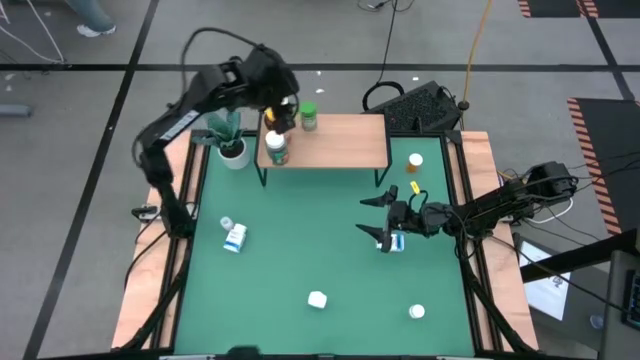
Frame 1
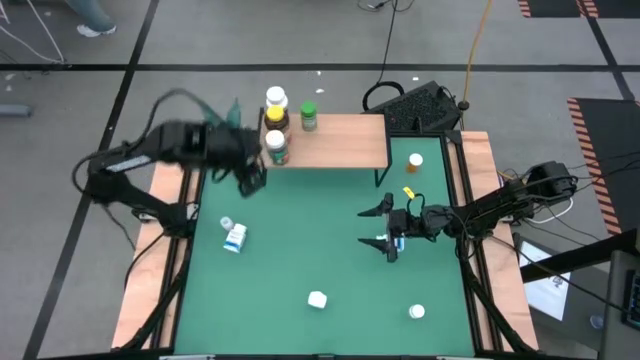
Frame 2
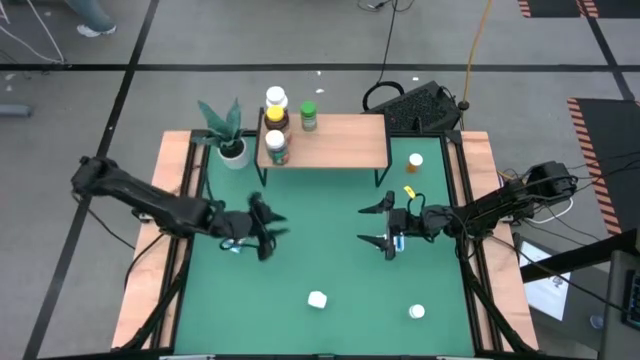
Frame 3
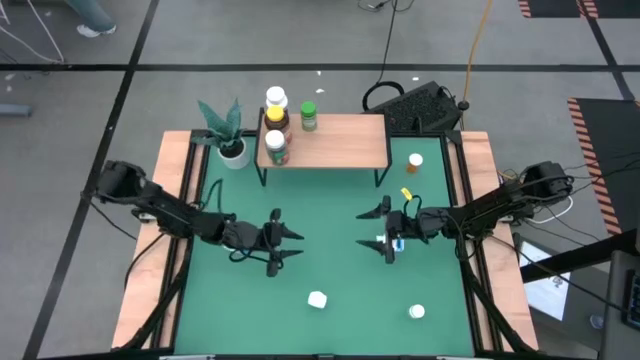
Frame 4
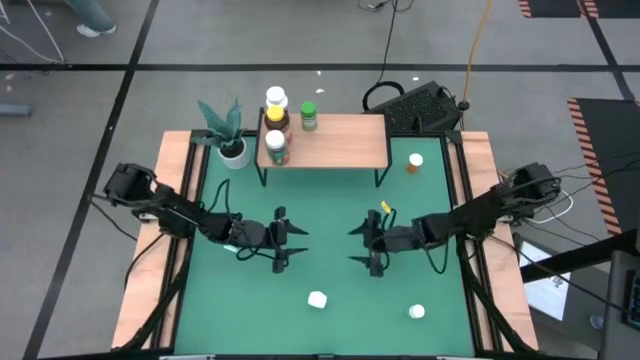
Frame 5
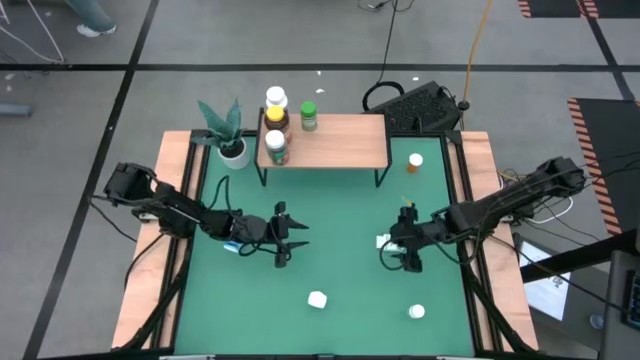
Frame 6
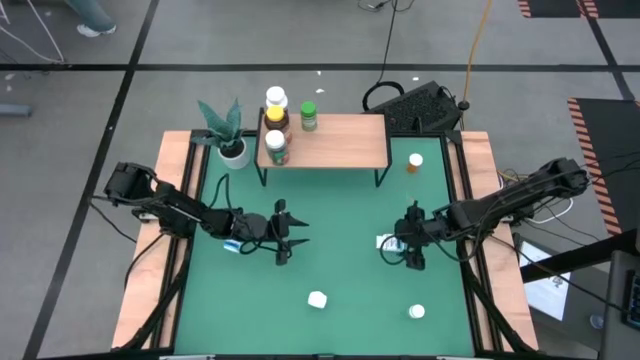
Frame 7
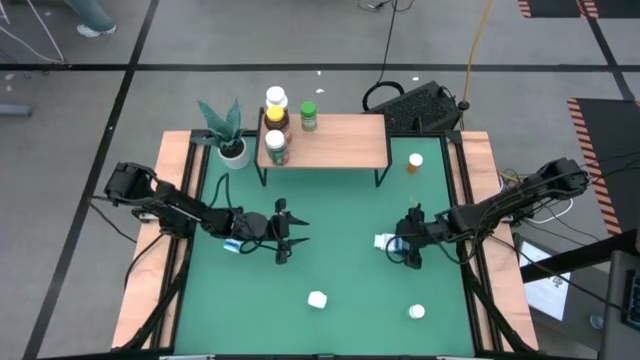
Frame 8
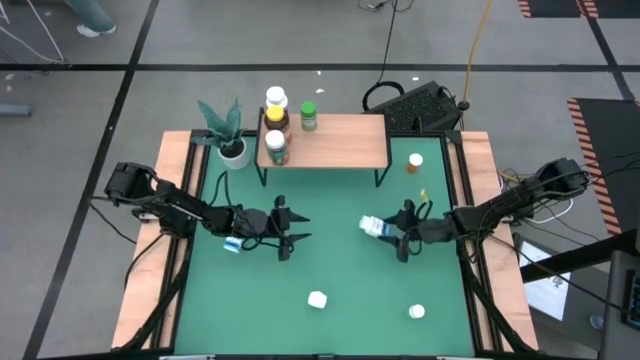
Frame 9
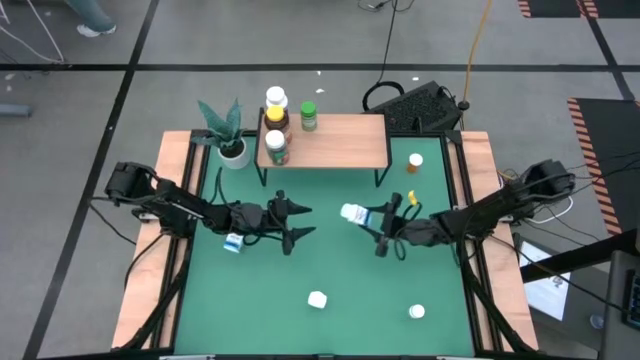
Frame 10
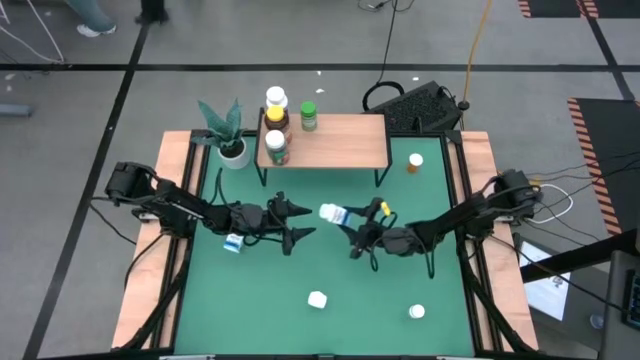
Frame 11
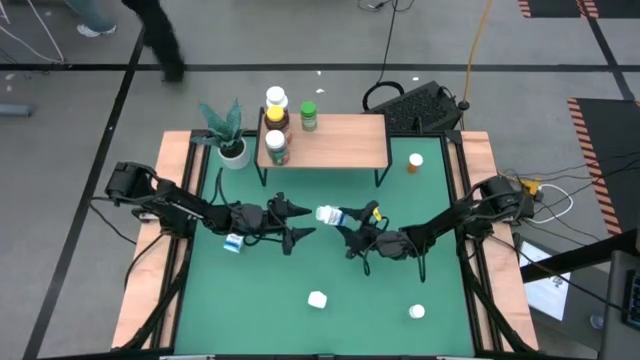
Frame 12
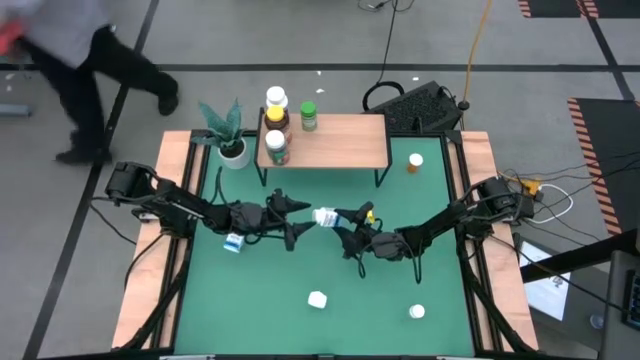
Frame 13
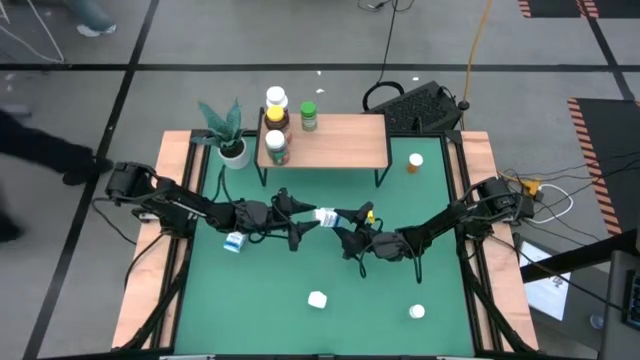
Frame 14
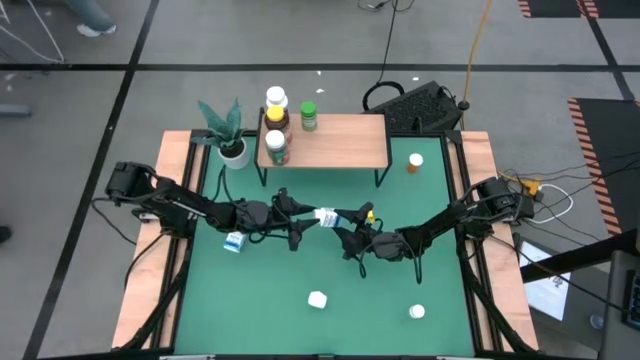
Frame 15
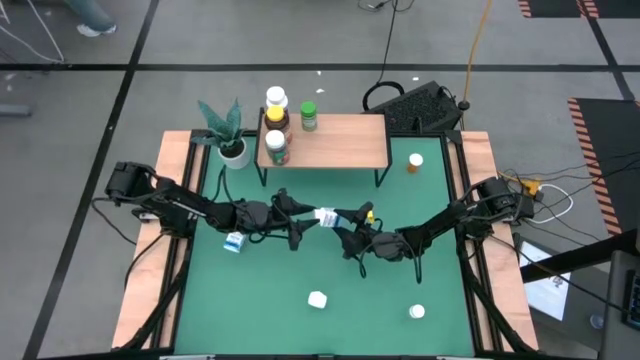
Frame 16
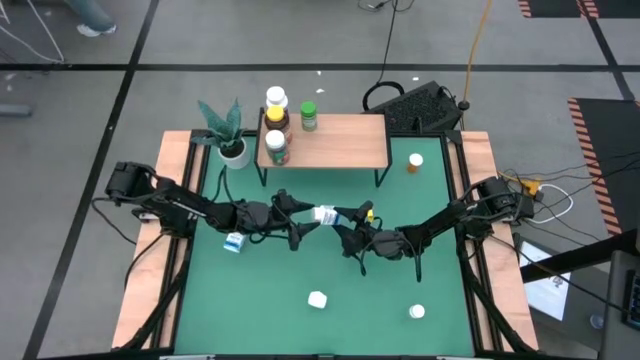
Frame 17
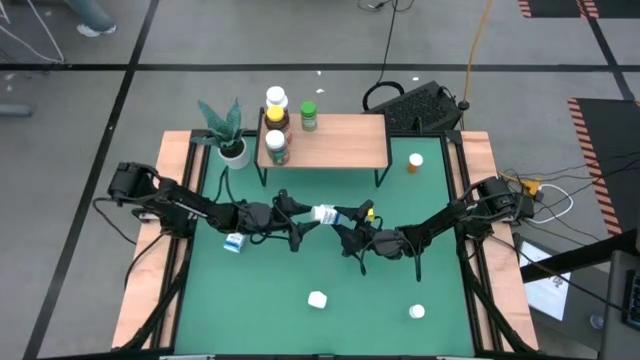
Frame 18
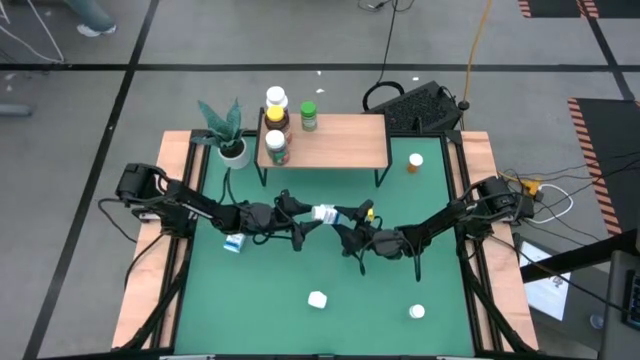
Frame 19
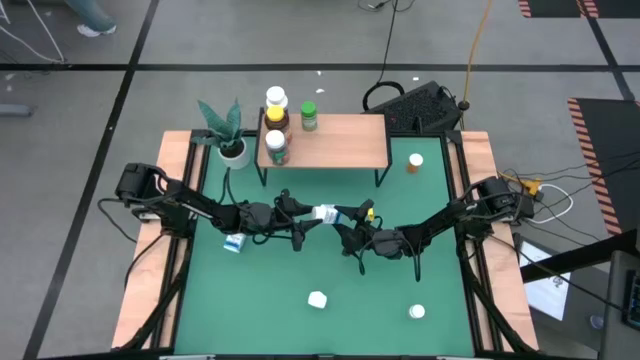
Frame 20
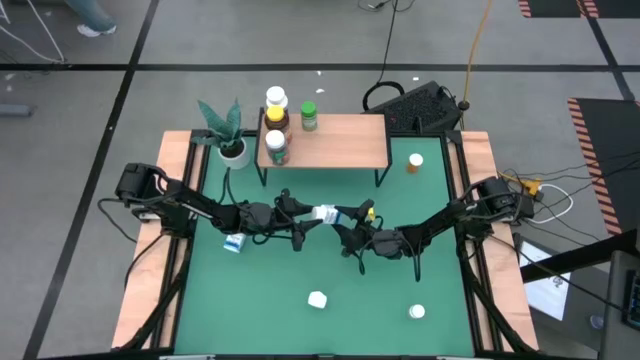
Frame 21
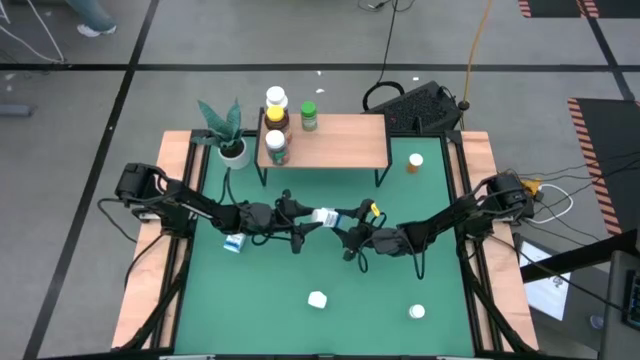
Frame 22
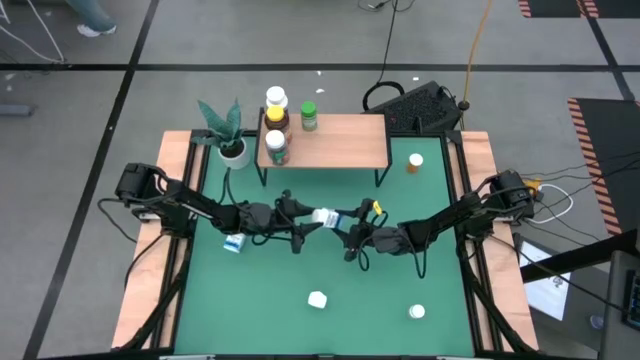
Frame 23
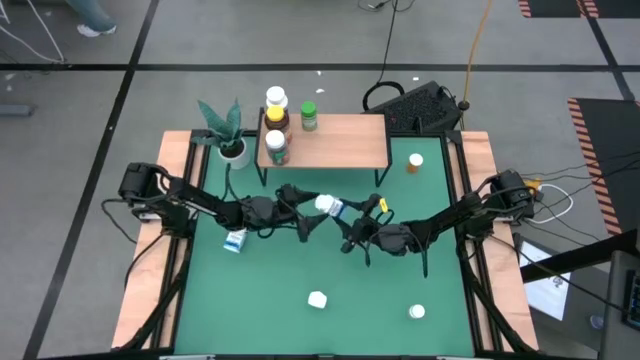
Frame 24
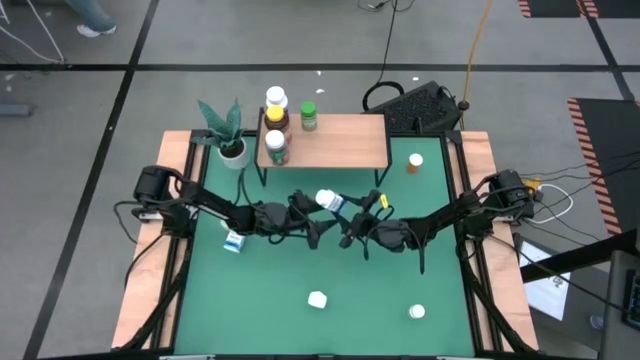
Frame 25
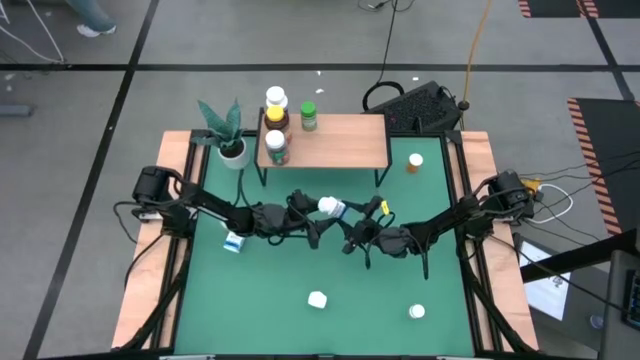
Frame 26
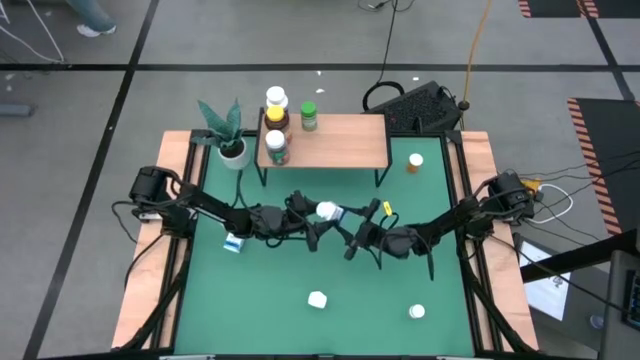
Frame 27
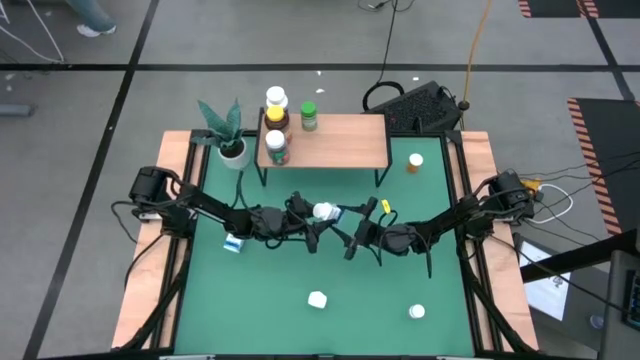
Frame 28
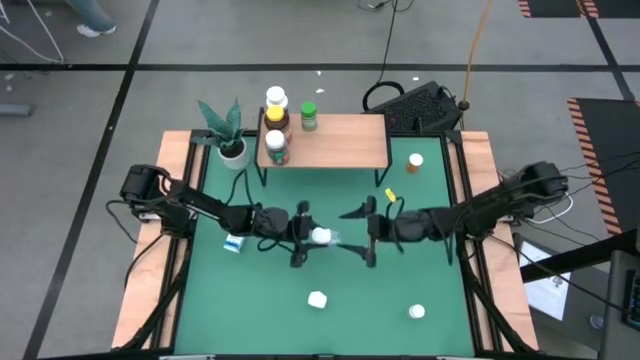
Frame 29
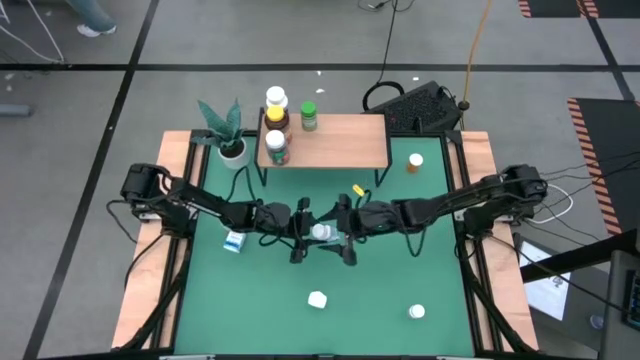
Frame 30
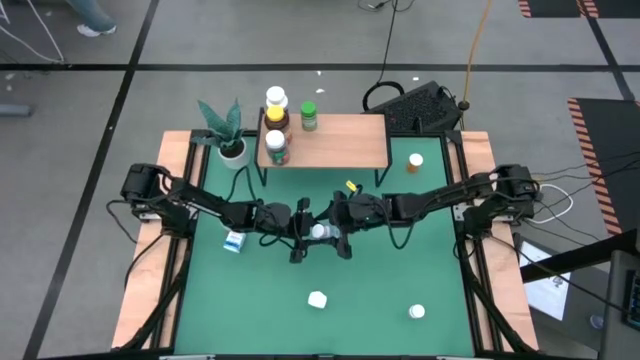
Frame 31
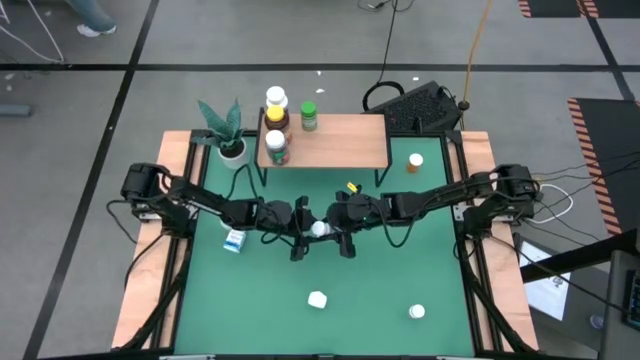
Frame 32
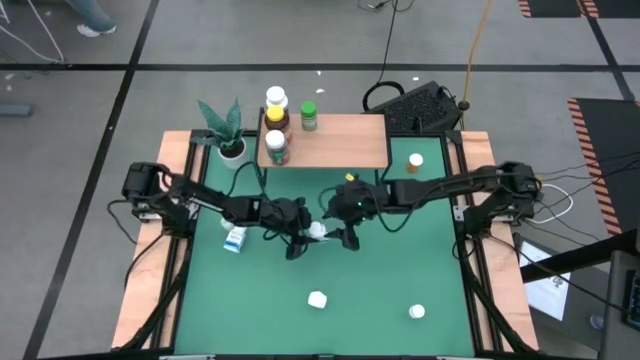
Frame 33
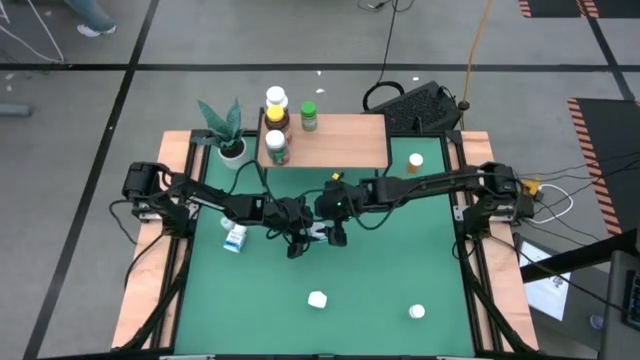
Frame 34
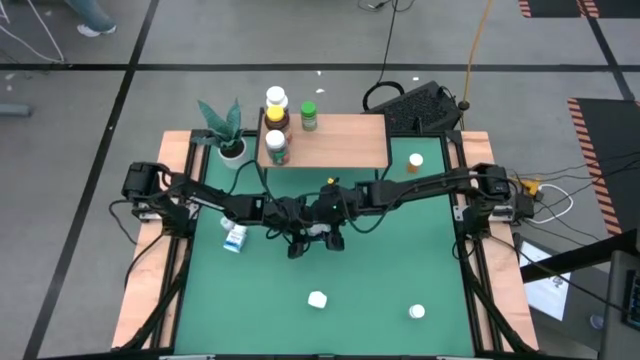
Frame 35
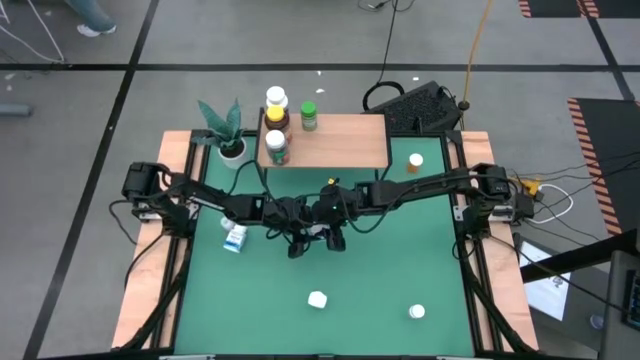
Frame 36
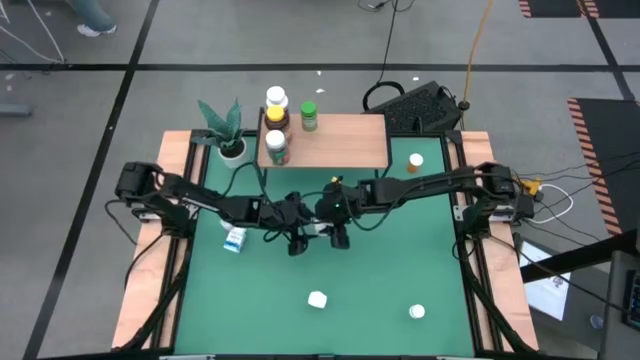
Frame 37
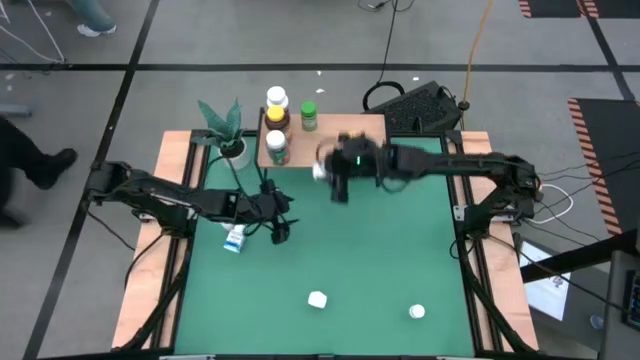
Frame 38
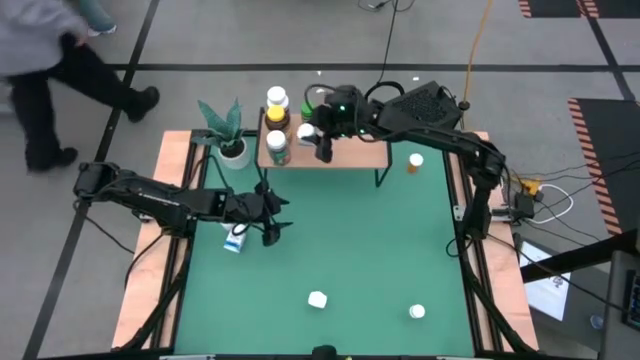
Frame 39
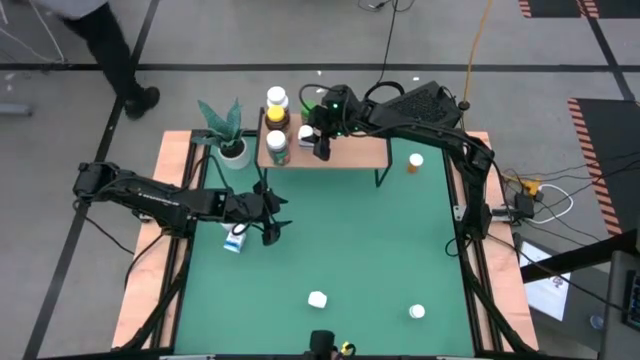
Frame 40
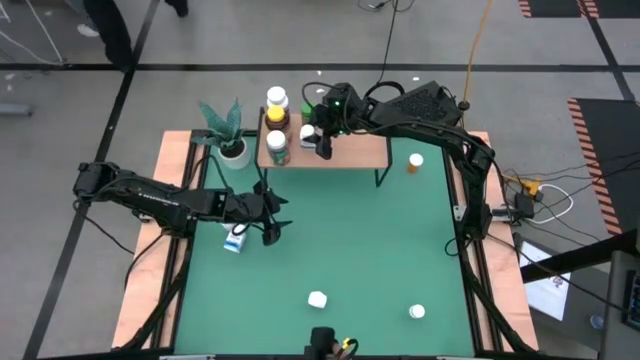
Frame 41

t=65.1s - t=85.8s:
Task: Pick and place medicine bottles onto shelf by color
Put the top right white blue pill bottle on the shelf aligned with the green pill bottle
